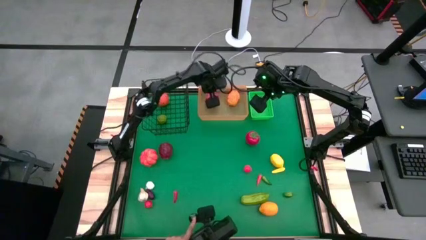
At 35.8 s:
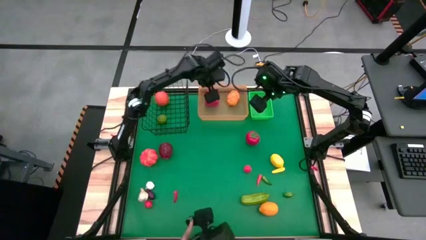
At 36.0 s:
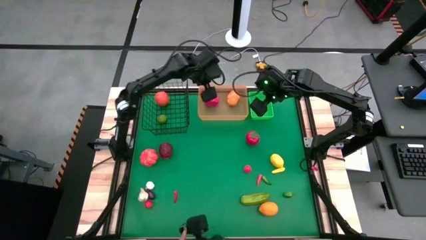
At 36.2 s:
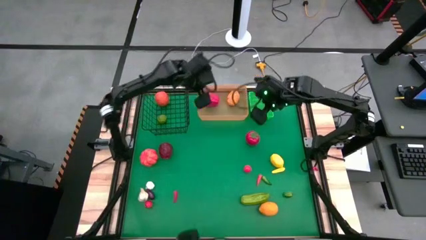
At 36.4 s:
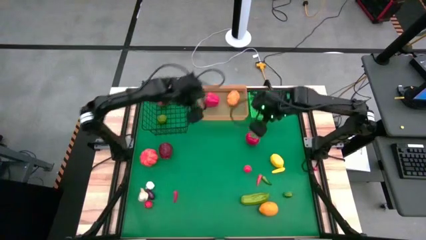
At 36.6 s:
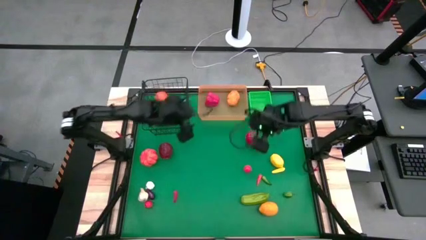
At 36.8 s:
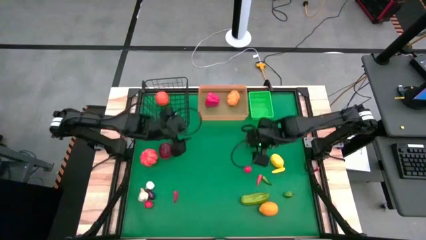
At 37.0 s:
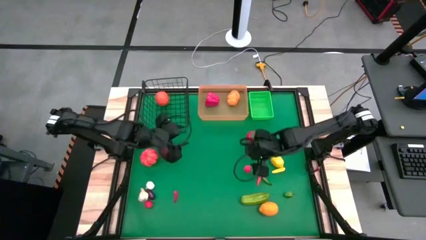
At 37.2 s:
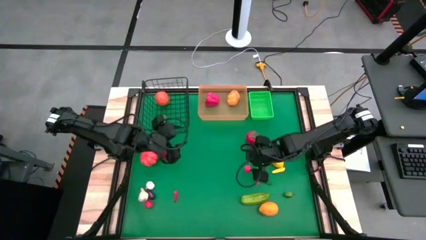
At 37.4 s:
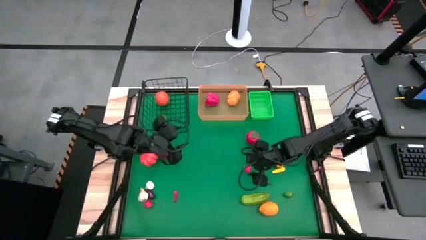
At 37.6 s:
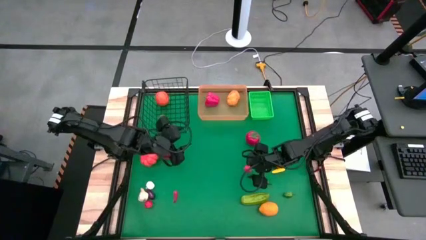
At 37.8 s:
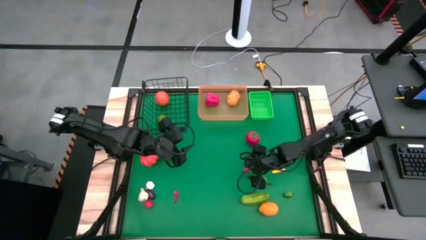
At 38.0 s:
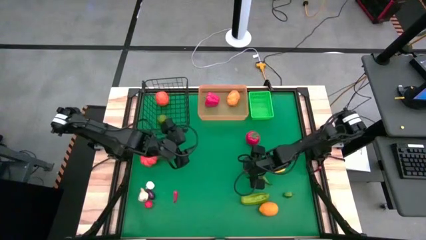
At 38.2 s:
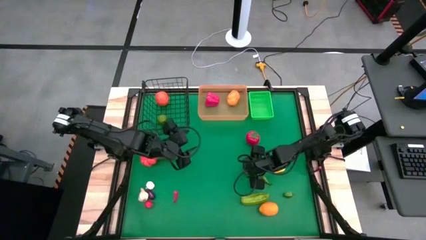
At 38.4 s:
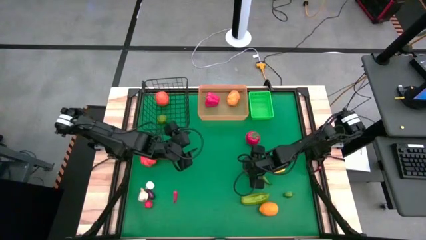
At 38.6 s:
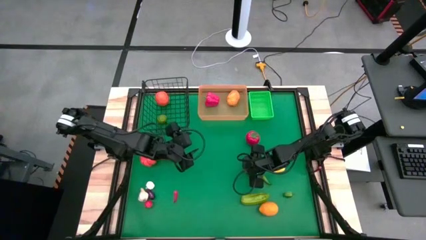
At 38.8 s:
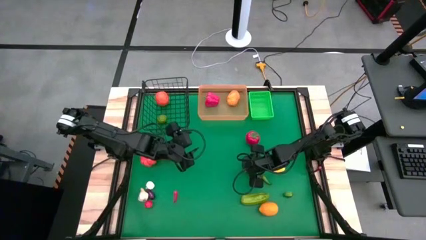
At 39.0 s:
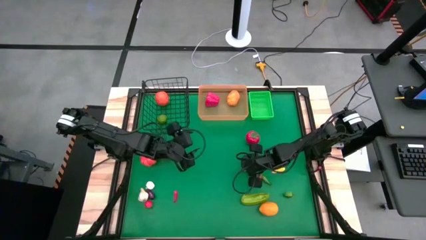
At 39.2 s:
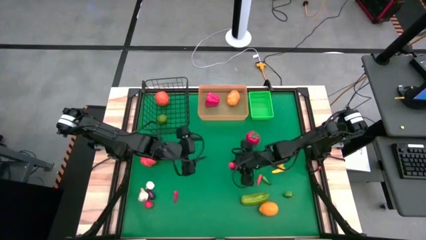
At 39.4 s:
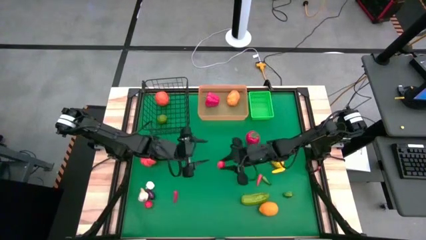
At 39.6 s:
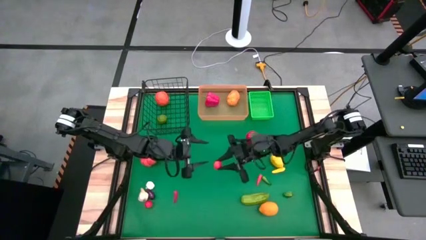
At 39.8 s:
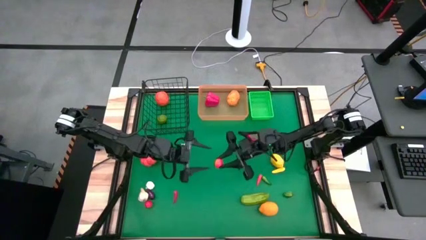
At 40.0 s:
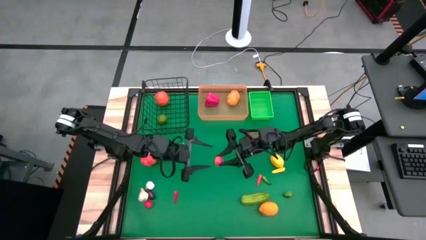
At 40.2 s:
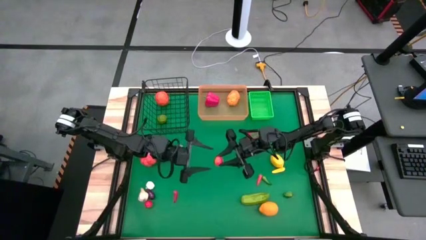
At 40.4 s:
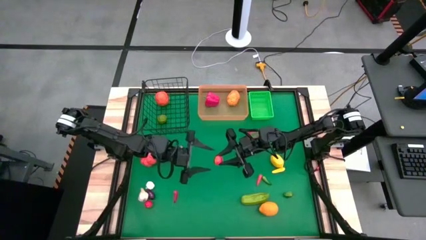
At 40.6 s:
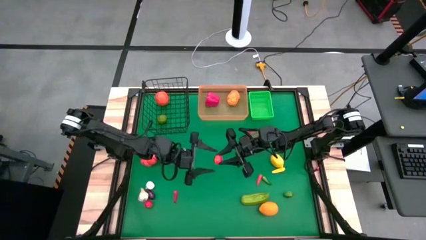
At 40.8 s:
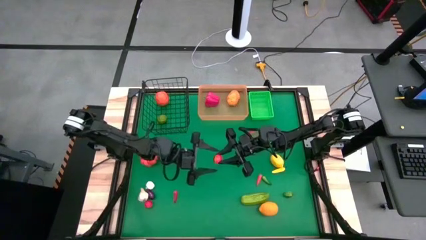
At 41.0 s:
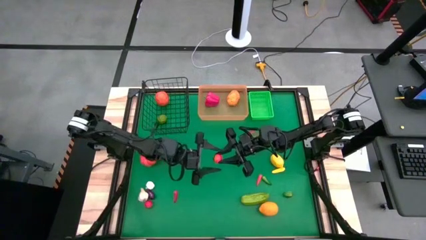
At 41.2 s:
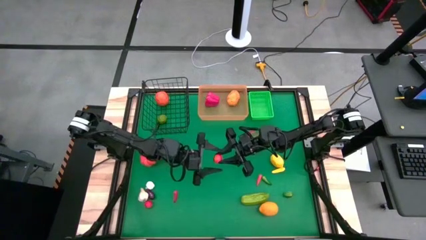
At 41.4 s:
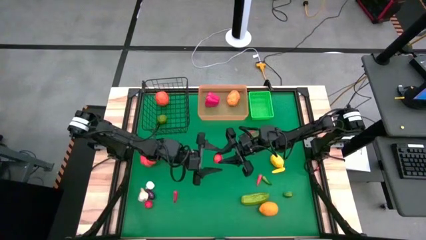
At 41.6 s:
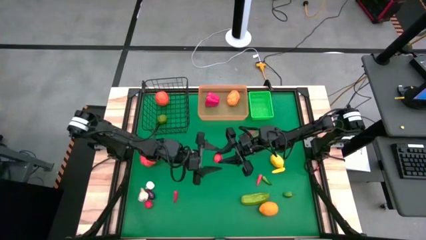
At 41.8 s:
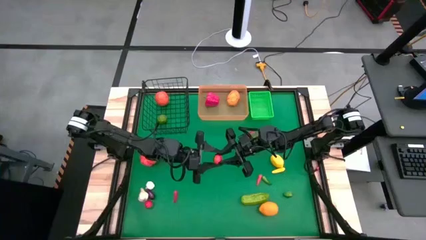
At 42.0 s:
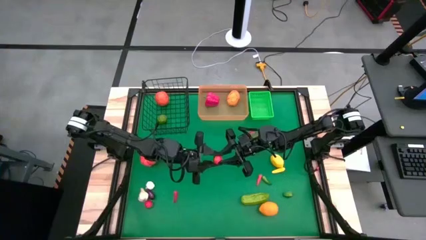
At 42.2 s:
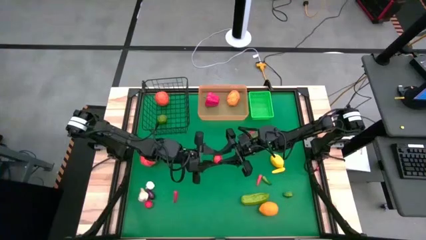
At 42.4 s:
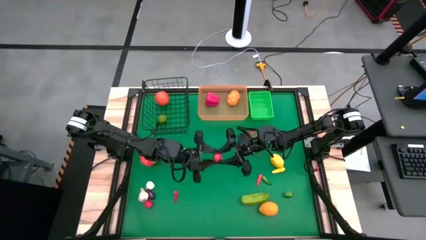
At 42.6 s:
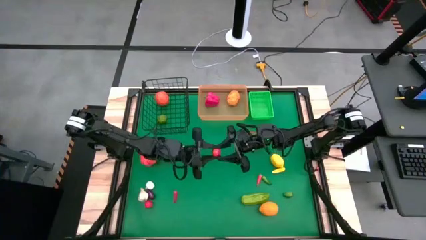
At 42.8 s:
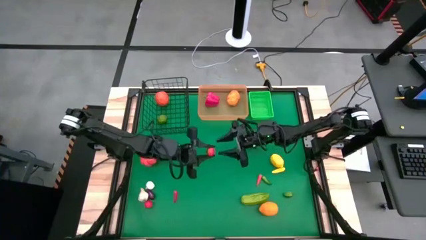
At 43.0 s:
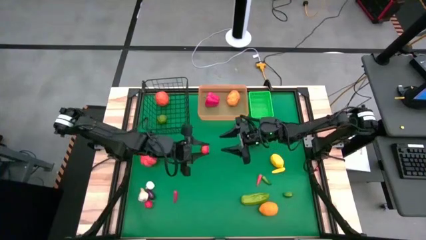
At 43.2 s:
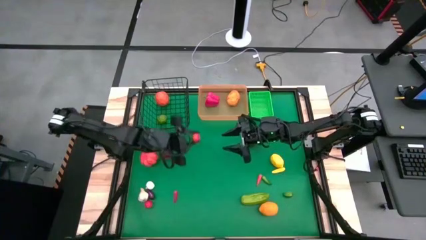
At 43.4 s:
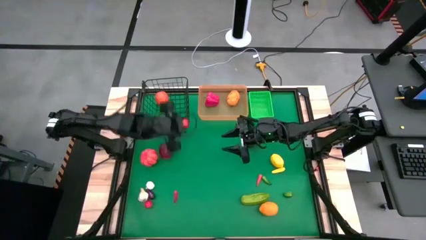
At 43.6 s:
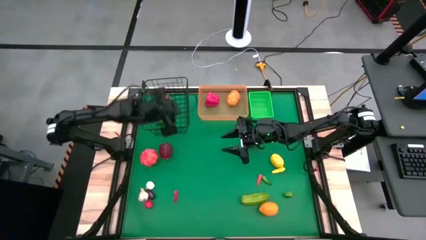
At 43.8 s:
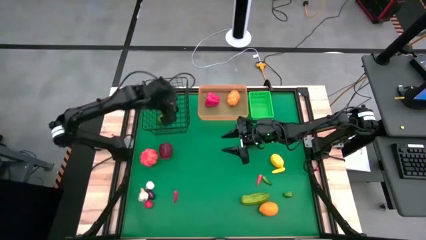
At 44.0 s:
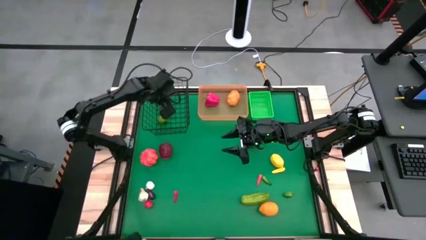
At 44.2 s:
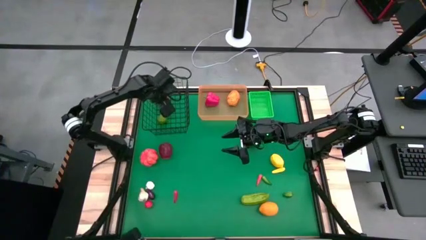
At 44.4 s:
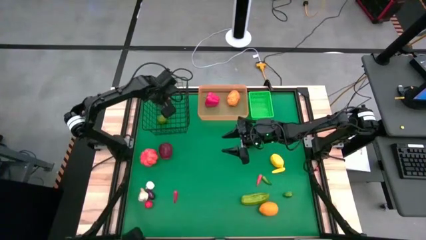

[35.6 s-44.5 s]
Task: Sort produce into baskets
Put the red peach into the black wire basket

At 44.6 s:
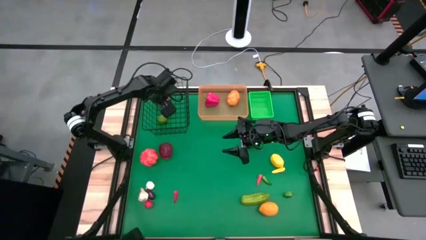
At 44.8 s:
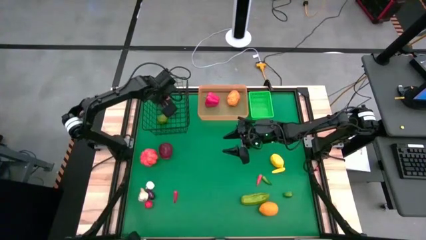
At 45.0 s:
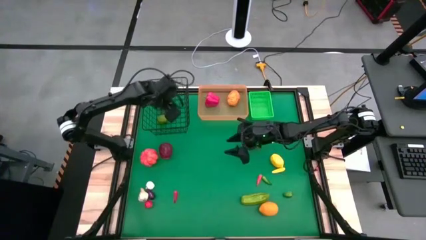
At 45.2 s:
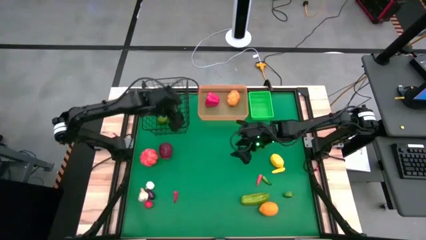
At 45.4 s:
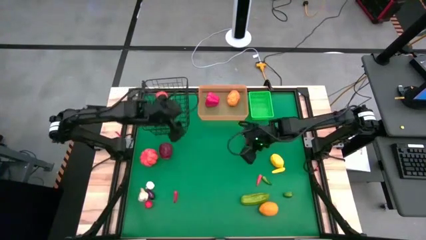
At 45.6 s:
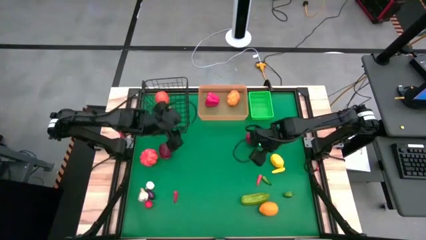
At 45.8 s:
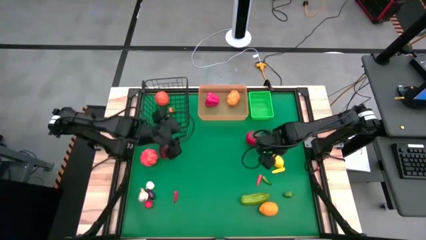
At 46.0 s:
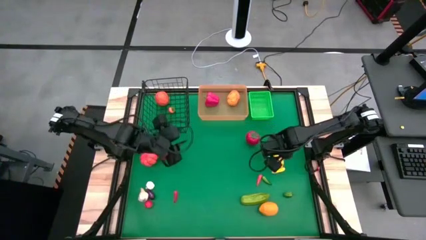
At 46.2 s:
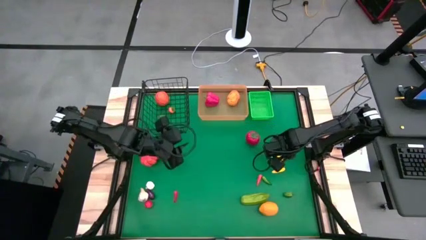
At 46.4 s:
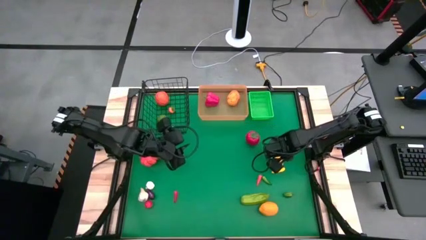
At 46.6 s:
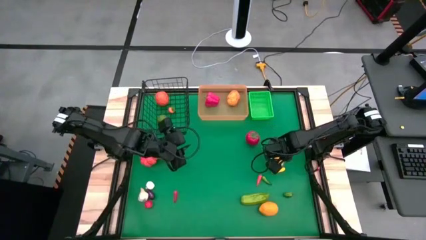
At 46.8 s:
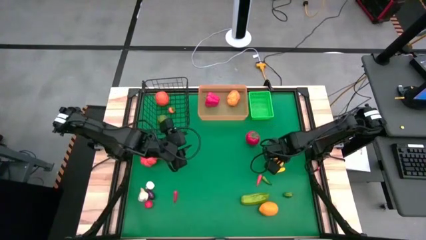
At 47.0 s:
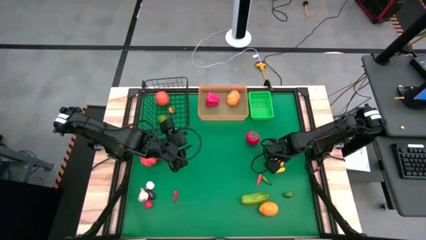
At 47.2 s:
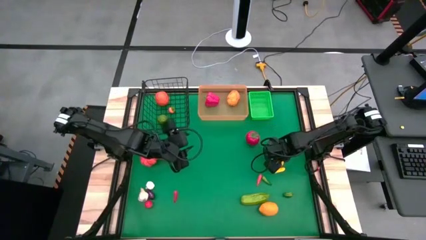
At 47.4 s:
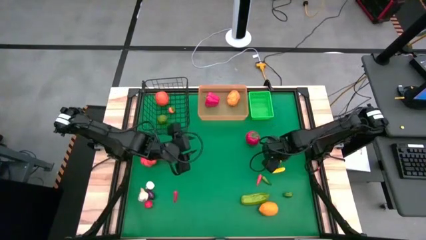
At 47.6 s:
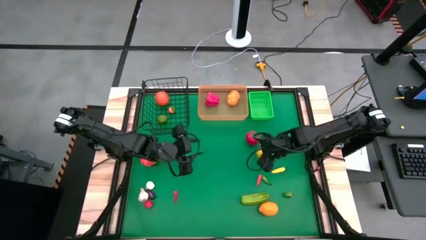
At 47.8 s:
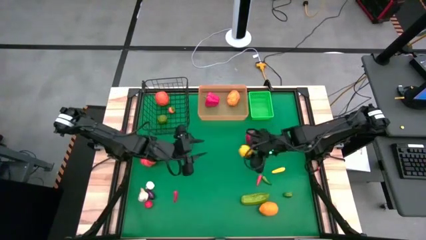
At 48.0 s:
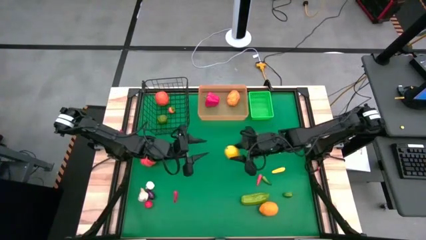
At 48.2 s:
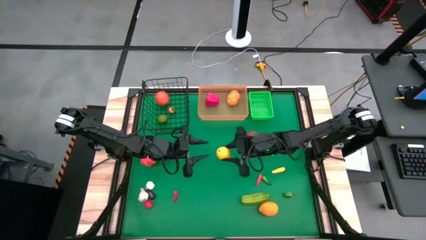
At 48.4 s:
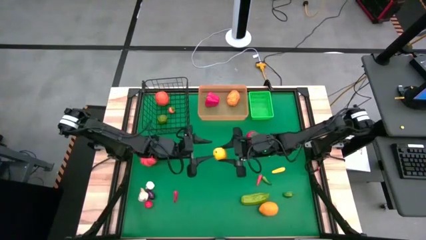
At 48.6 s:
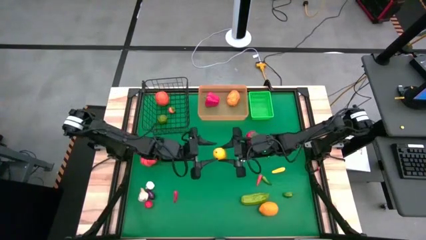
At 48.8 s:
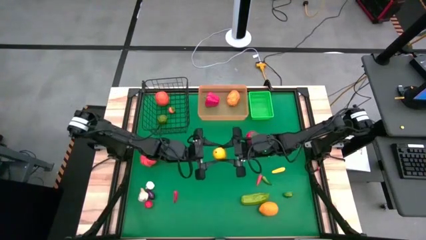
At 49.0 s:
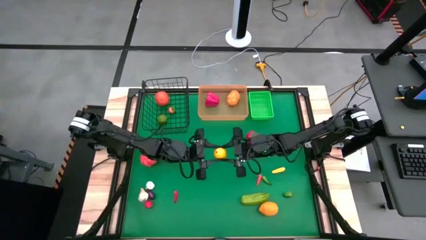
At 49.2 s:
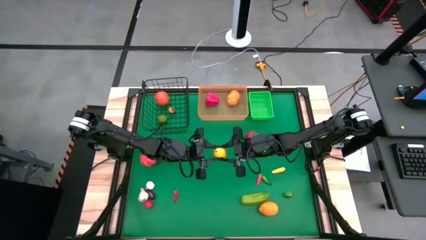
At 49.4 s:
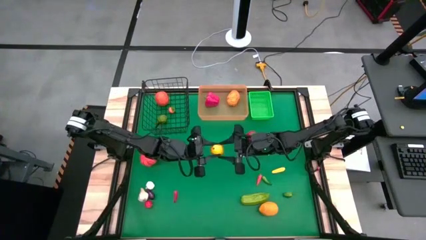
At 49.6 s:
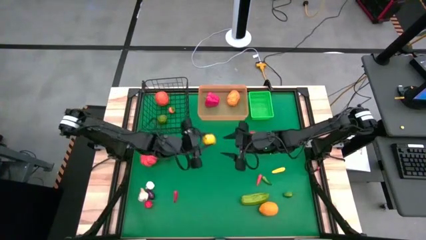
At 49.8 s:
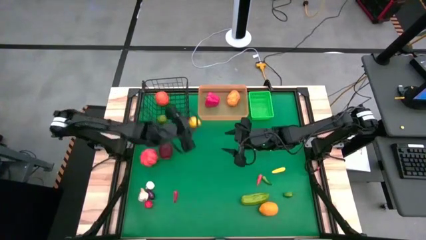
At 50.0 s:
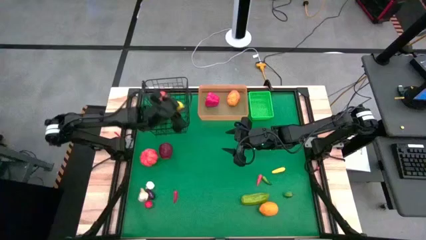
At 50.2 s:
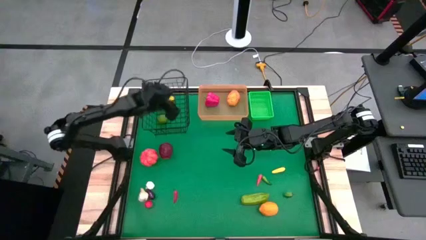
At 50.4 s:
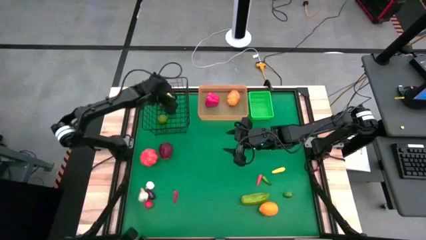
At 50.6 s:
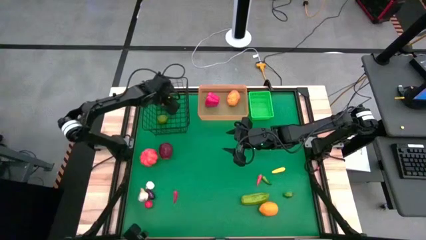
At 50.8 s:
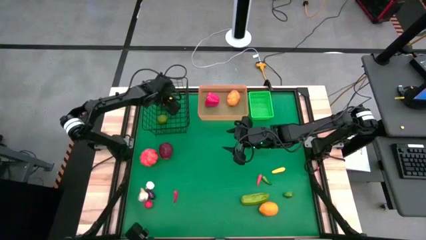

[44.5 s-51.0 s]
Put the yellow lemon into the black wire basket

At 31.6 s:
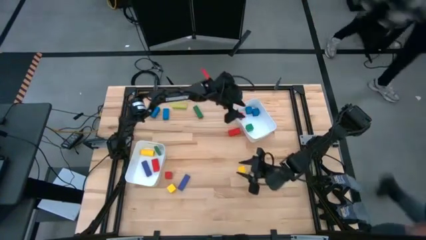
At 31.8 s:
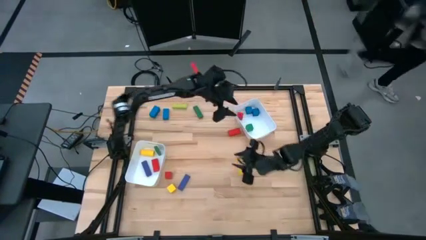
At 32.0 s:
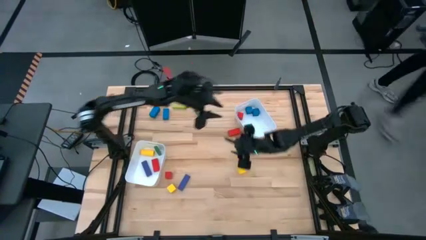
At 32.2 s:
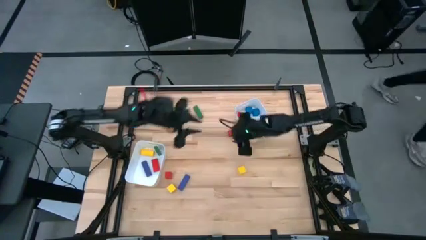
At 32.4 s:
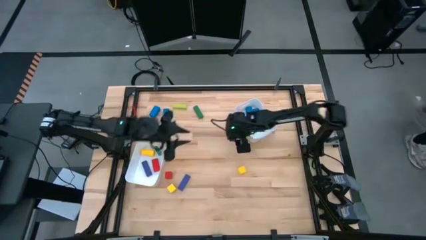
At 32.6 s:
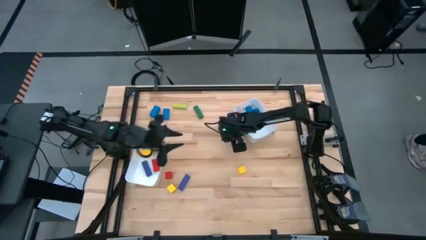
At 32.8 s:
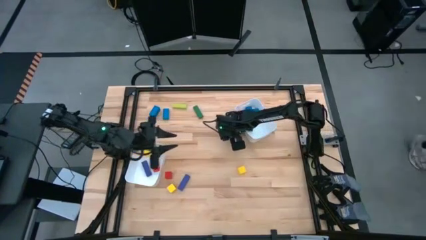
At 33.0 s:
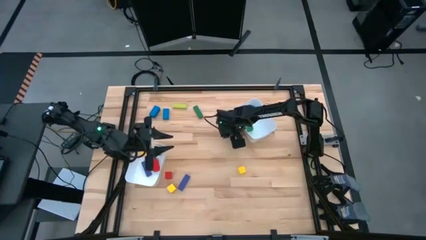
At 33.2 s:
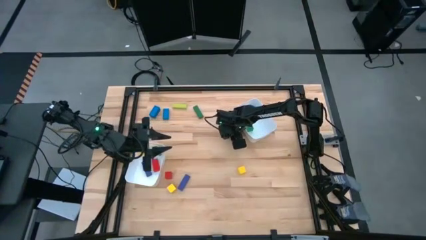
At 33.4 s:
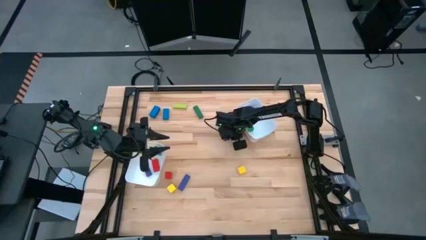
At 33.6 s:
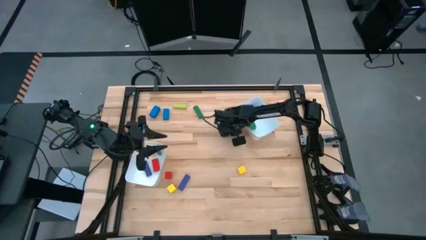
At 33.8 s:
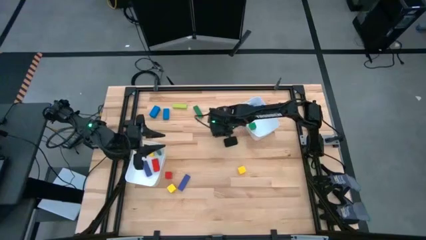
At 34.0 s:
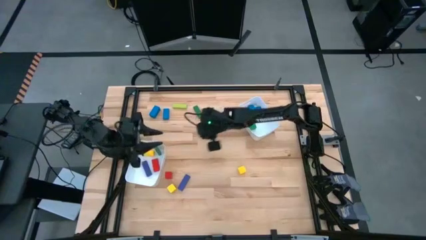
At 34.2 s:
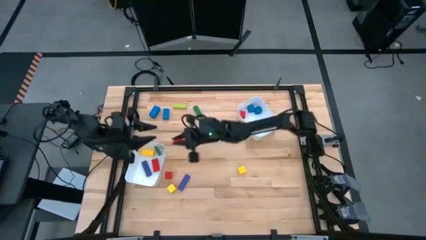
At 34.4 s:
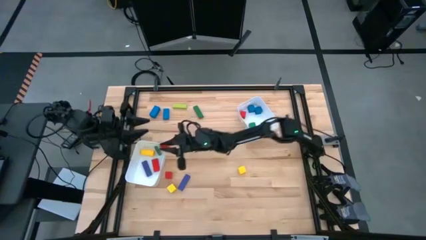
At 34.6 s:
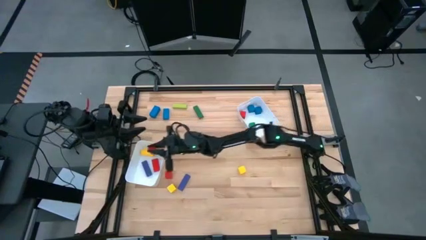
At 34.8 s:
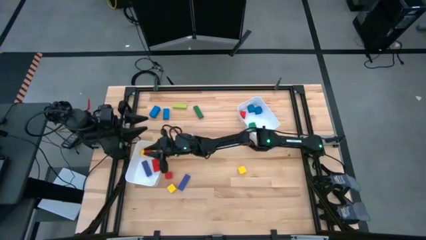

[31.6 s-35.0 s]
Task: Sort blocks by size
Put the large red block into the left white bin
